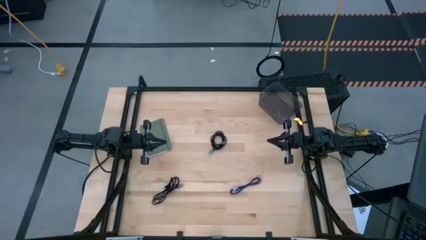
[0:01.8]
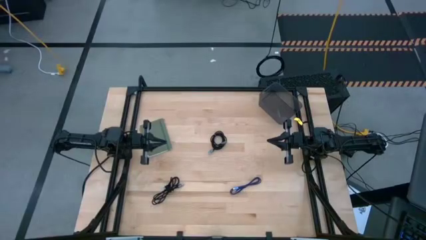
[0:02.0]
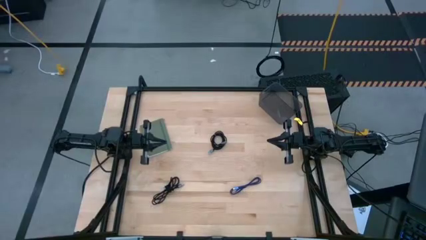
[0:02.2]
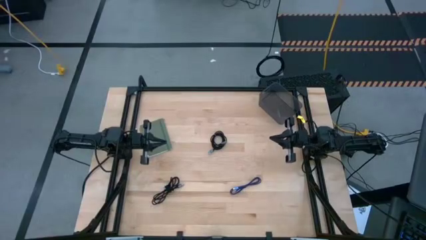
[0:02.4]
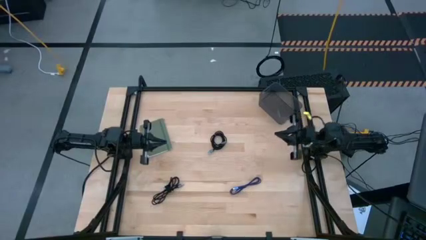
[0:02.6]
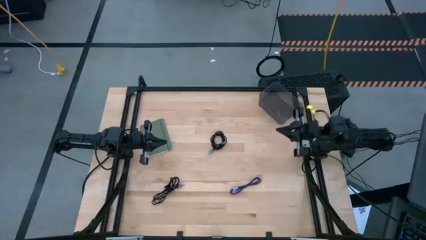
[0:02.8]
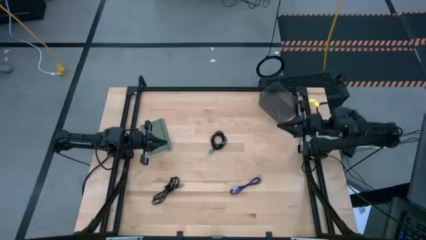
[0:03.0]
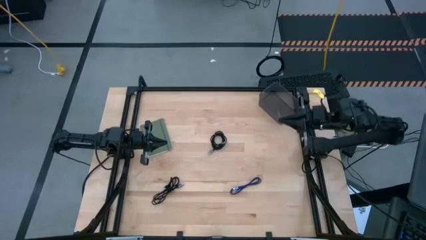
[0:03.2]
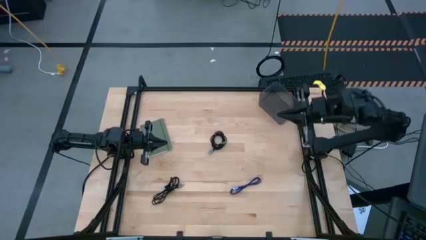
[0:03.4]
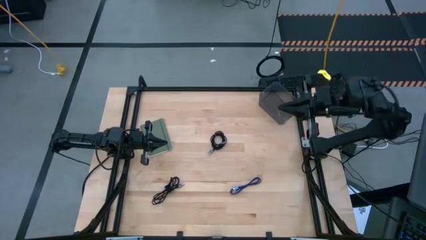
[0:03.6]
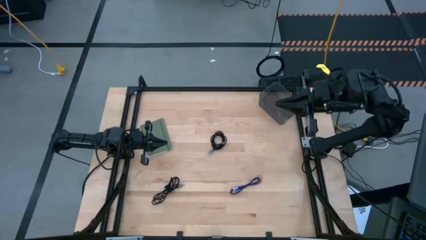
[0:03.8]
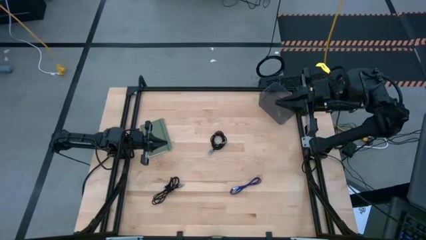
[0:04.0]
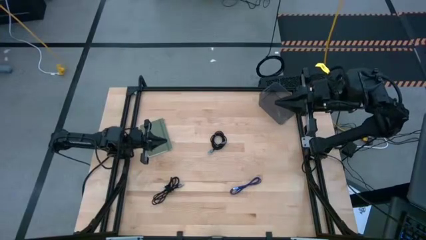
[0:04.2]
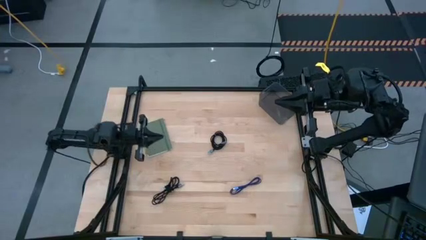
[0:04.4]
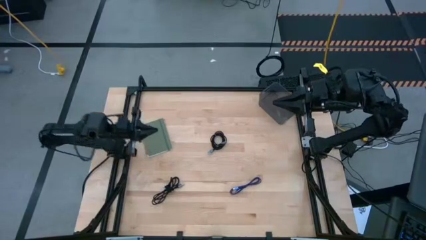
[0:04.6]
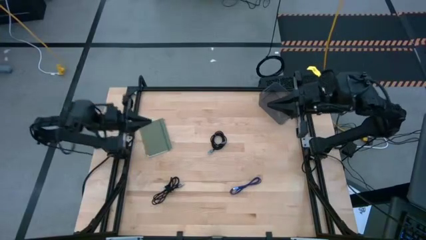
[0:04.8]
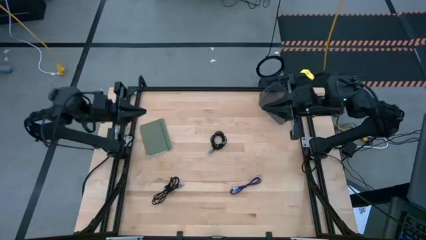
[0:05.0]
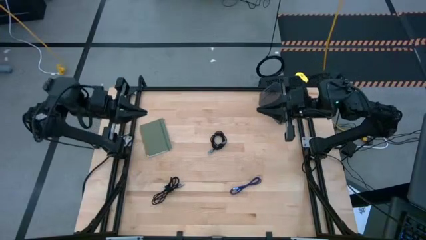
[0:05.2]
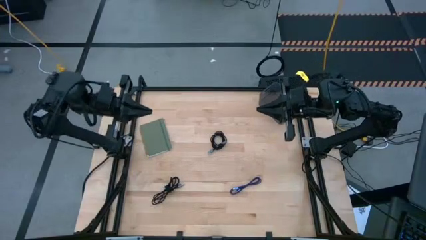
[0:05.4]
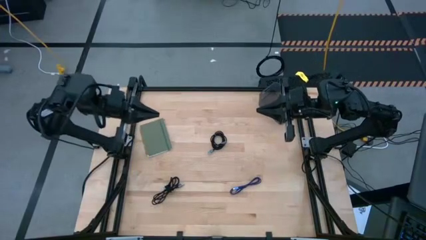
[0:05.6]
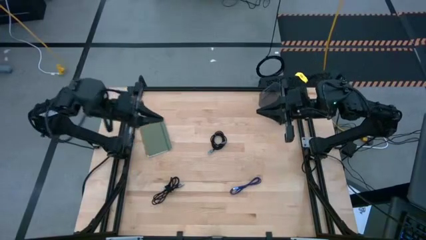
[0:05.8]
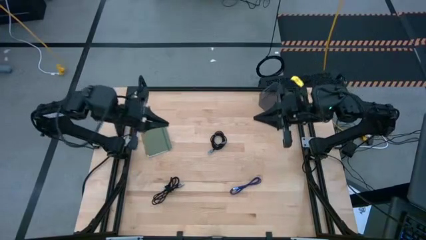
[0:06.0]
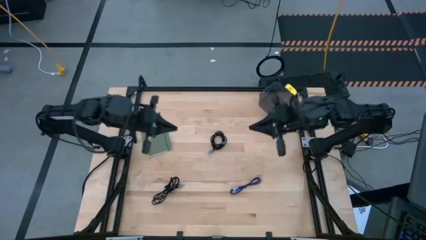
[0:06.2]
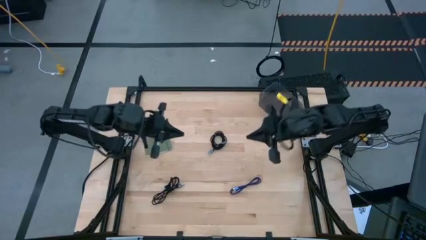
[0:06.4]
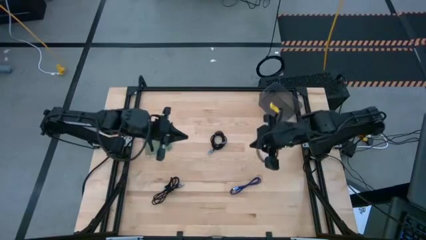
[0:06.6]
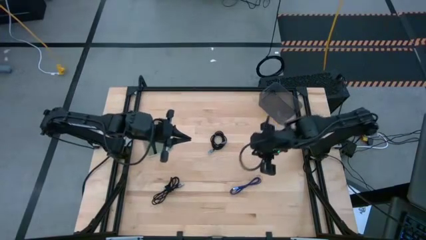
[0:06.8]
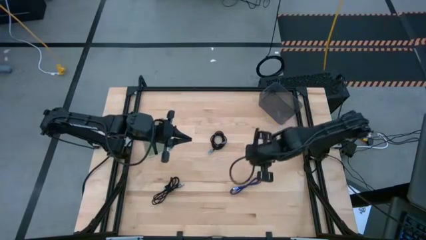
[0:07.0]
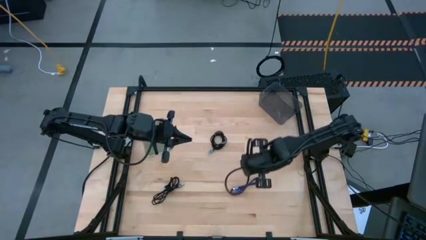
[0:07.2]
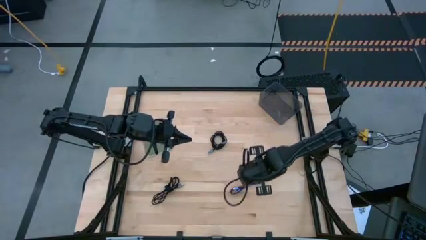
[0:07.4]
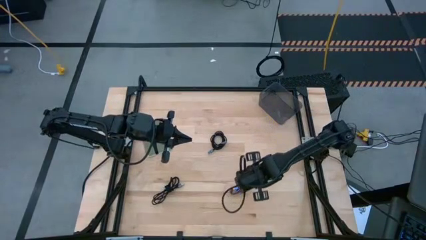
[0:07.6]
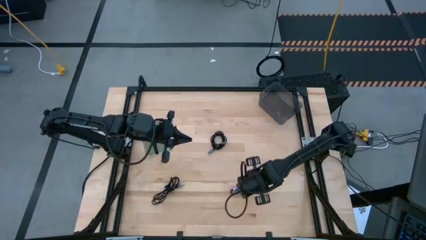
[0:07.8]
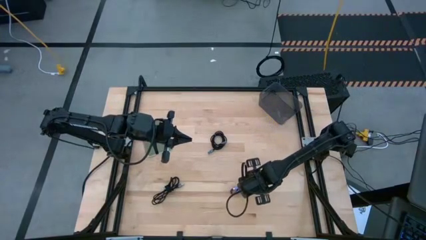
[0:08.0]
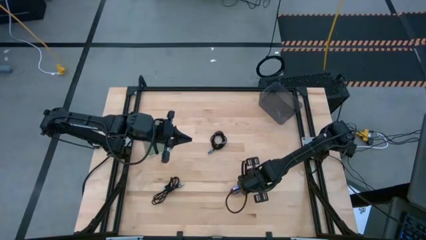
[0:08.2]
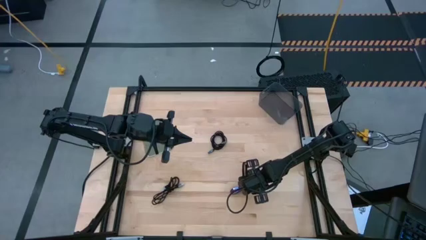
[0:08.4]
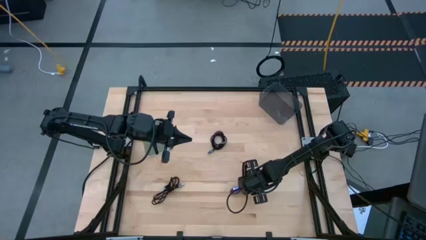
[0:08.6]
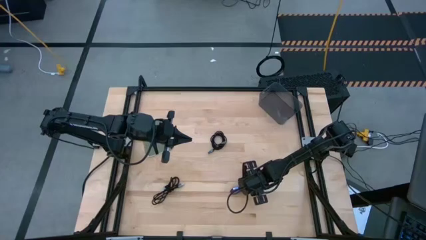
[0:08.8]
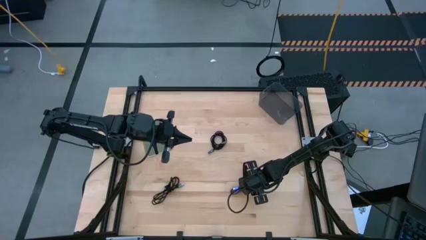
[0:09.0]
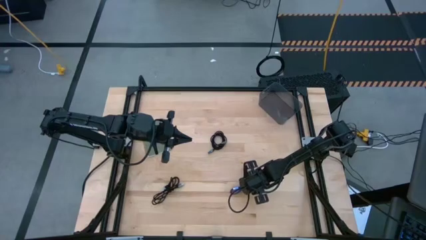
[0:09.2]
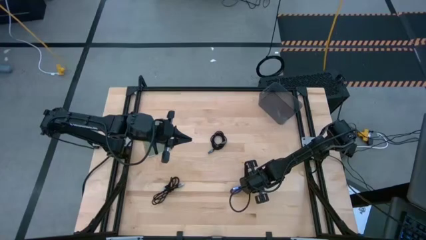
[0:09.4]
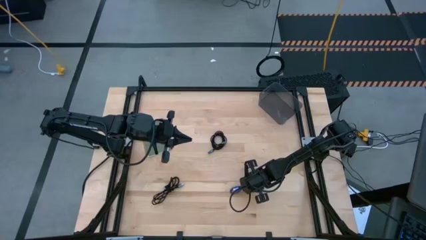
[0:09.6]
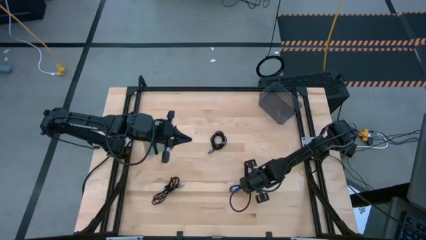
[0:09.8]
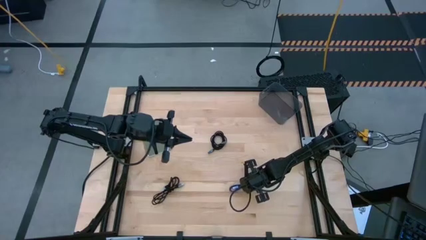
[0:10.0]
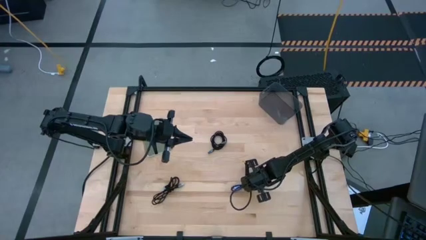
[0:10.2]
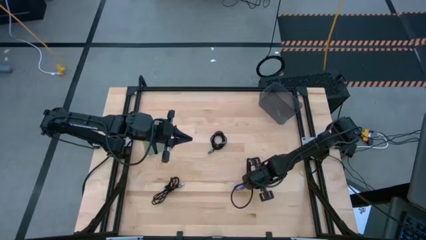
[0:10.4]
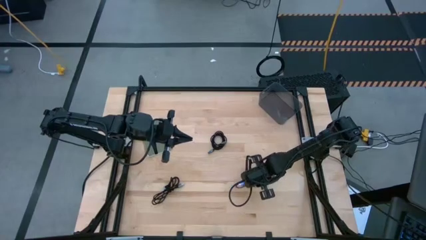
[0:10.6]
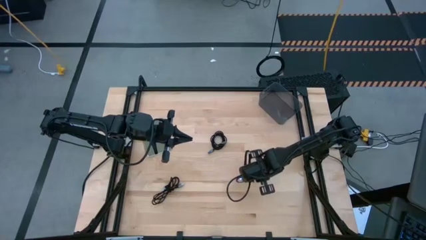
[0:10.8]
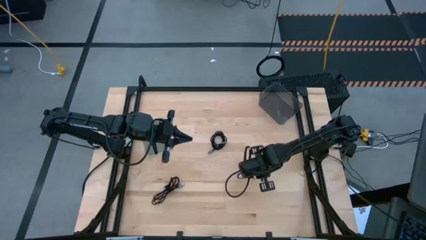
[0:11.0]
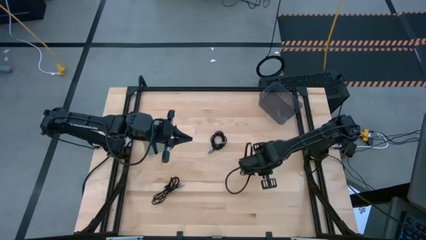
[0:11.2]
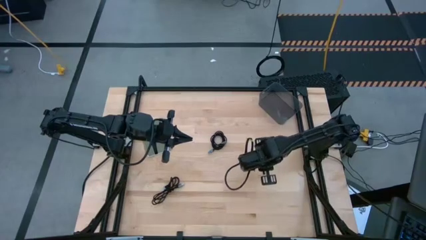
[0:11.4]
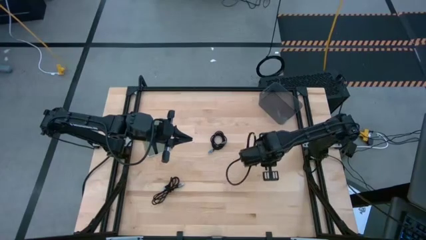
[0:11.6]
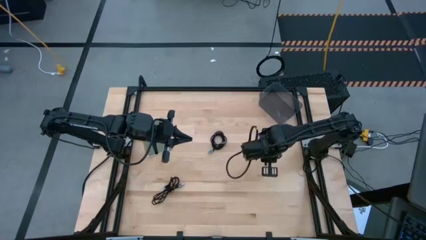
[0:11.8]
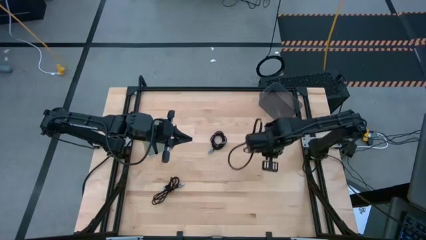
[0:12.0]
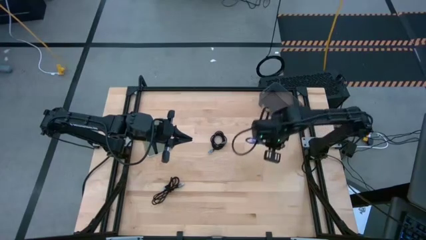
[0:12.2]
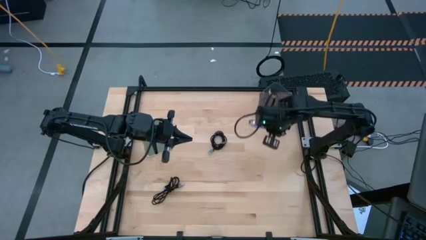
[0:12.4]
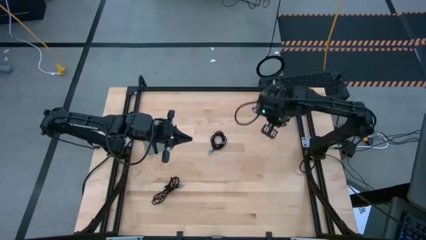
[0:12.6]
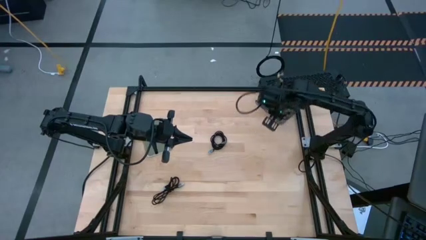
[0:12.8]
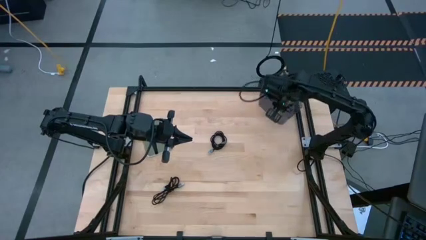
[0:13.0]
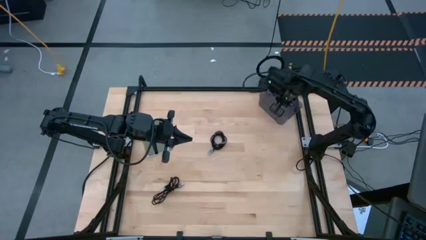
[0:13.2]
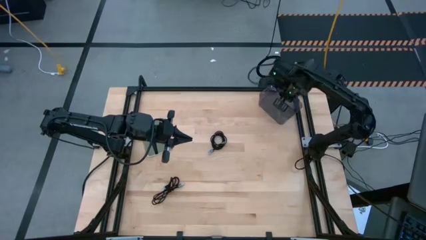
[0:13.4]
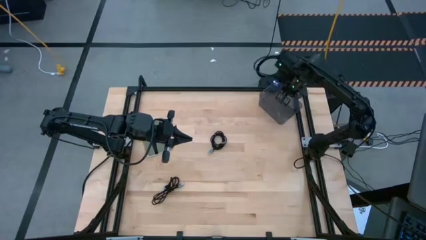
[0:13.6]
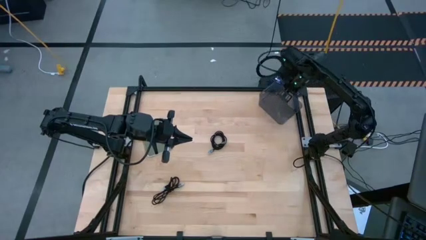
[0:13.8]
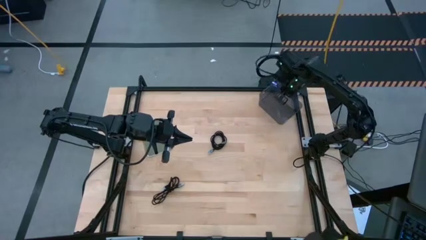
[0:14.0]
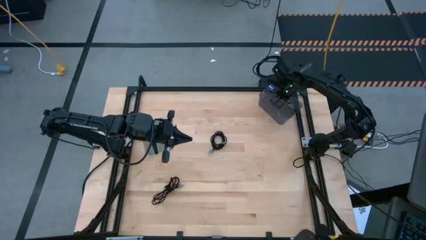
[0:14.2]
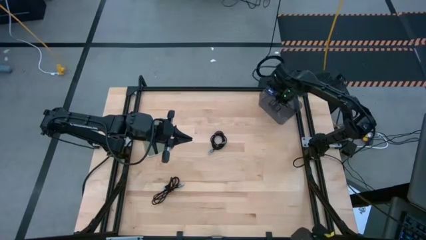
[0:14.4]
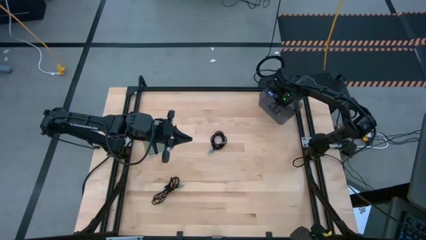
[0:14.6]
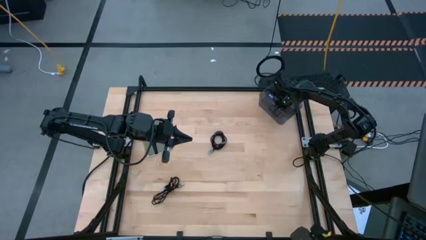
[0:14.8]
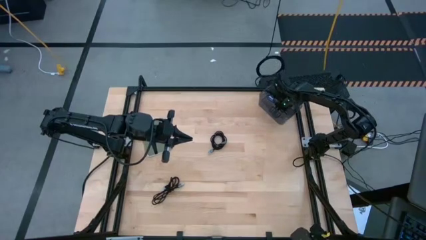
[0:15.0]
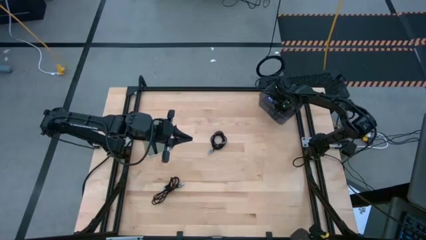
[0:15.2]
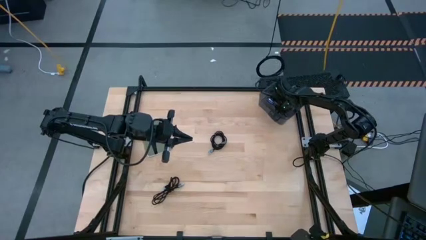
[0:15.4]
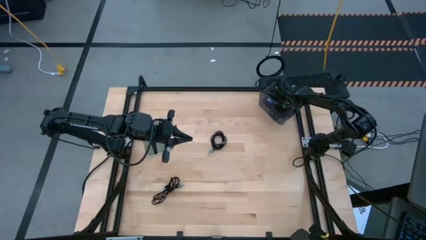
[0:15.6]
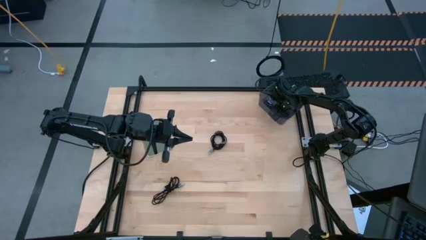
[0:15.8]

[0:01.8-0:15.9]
Task: Pick and place USB-C Cables
Put the purple charger cable into the black bin
